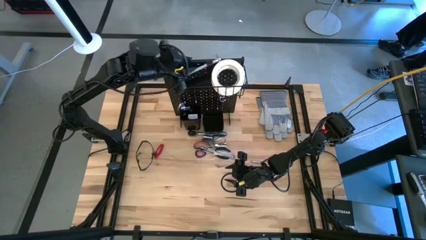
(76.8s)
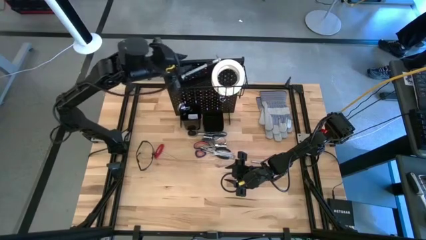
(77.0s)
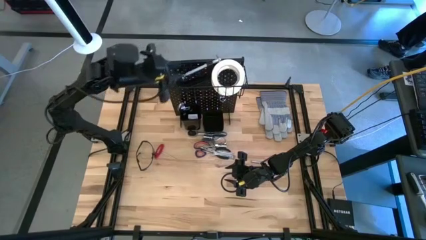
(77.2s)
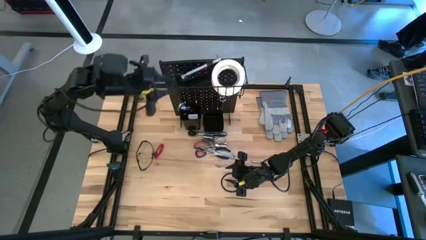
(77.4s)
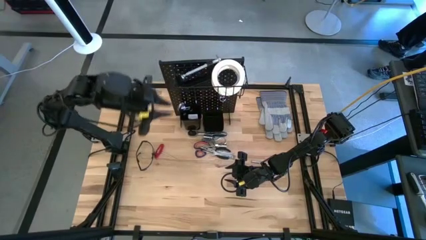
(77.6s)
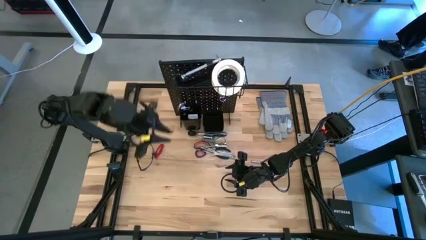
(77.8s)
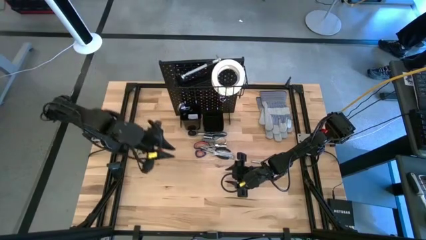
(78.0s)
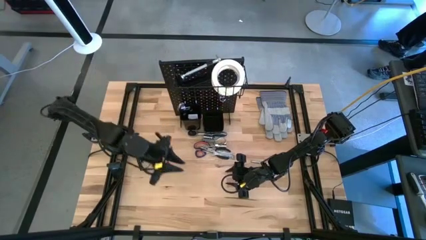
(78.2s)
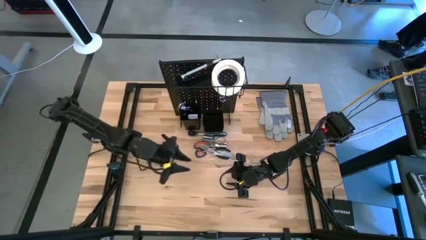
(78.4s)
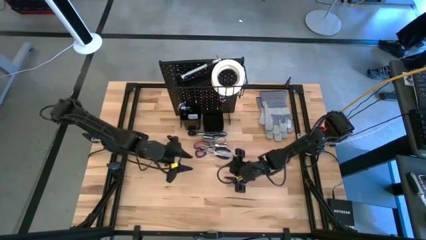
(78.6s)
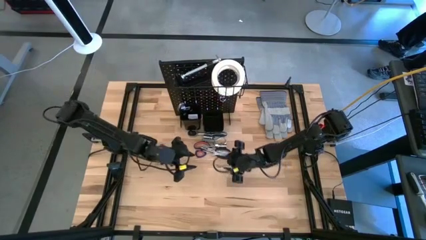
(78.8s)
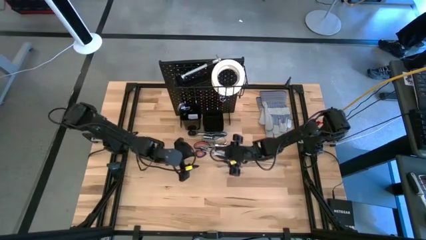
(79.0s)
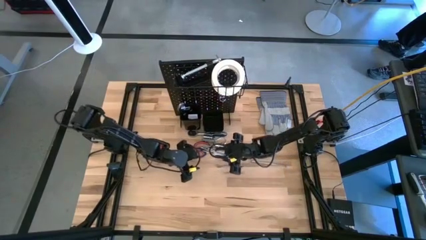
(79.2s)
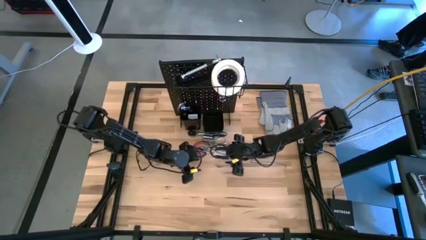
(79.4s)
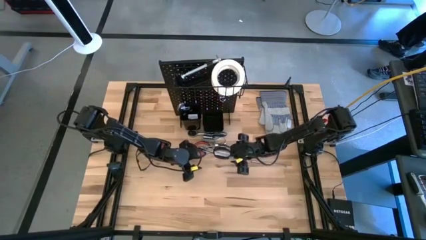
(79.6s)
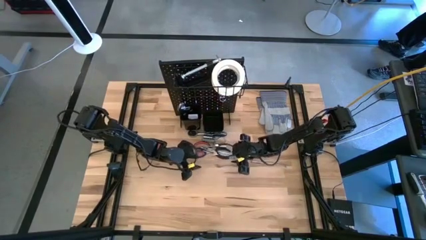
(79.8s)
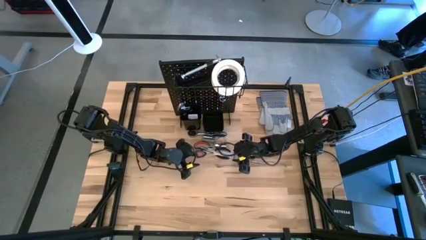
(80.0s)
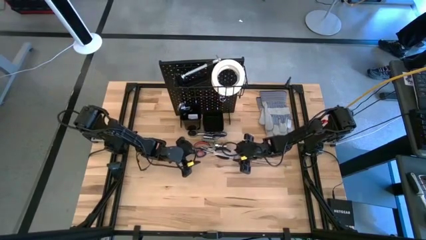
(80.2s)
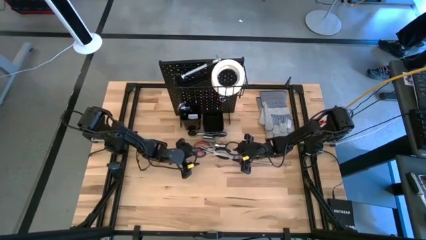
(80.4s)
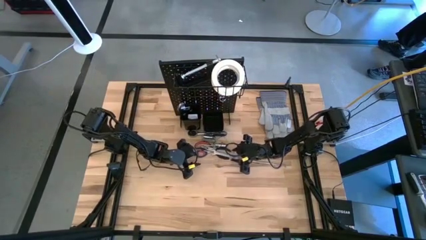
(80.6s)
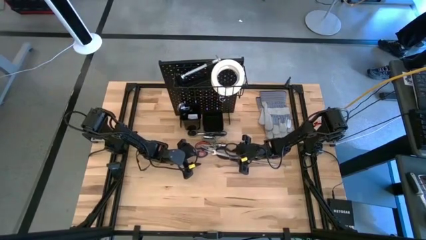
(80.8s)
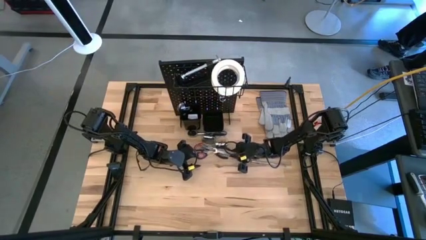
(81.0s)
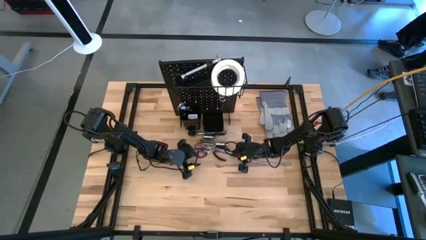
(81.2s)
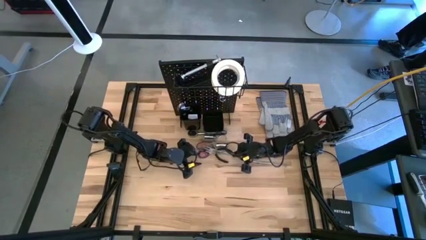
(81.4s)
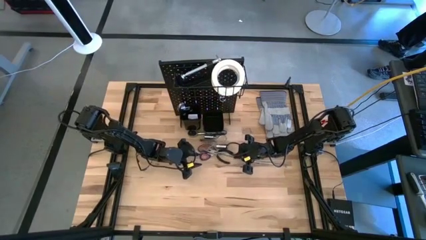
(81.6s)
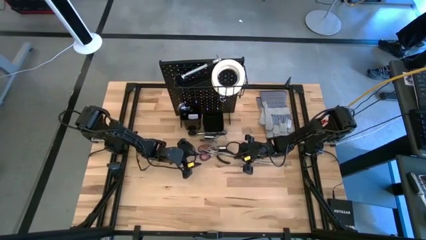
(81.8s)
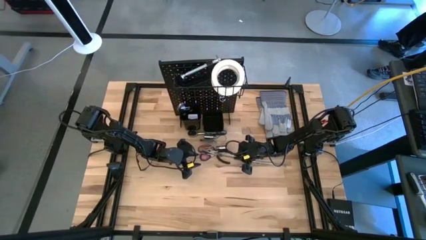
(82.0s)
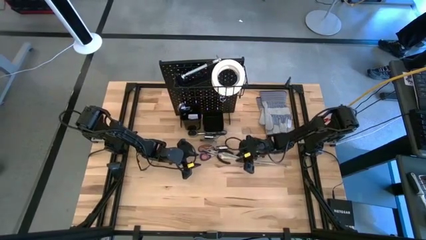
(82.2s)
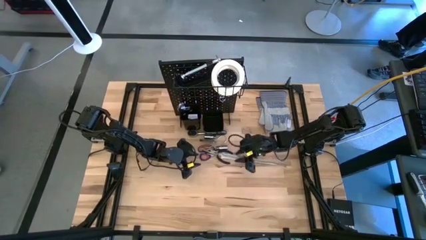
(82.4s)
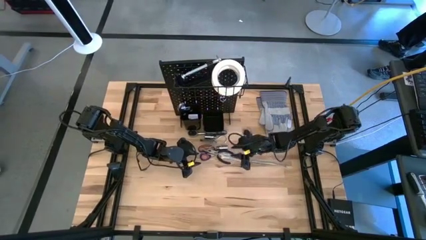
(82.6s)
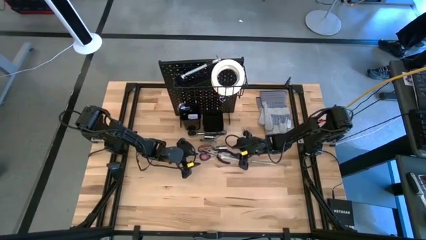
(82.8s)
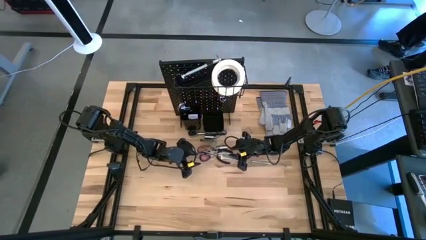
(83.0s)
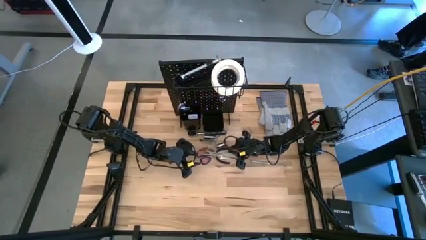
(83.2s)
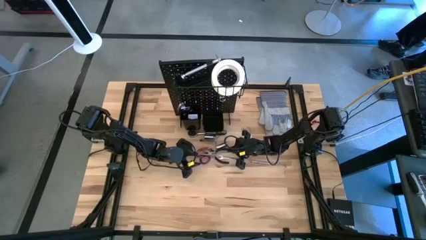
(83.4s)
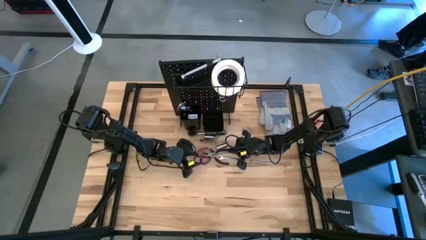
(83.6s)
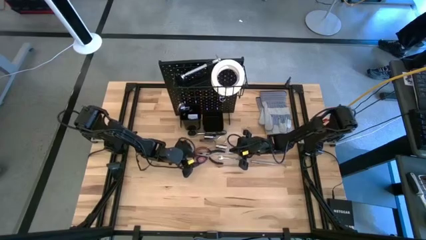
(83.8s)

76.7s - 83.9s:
Task: Hang tools onto peg board
Put the long nose pliers into the left bin on the pegboard

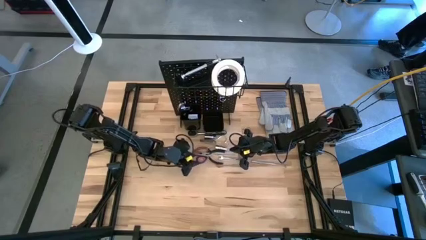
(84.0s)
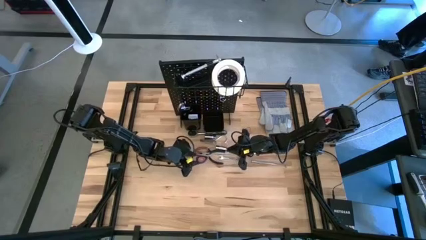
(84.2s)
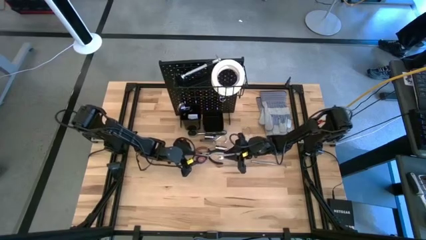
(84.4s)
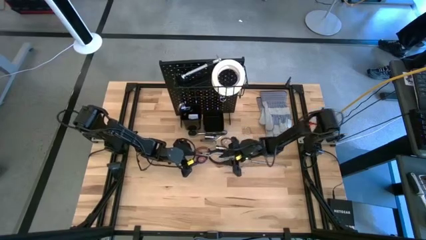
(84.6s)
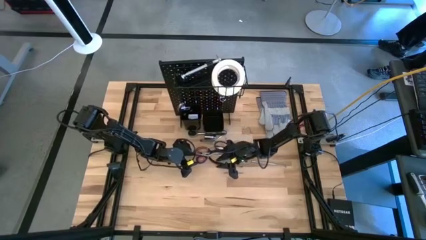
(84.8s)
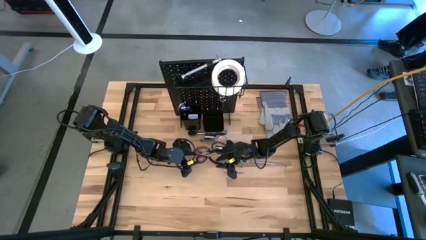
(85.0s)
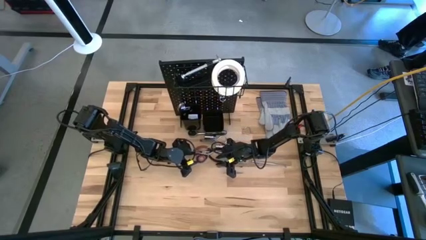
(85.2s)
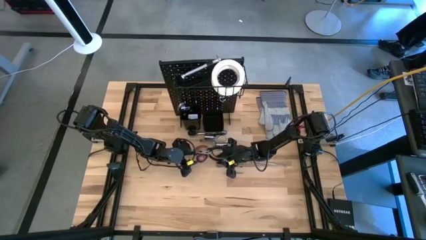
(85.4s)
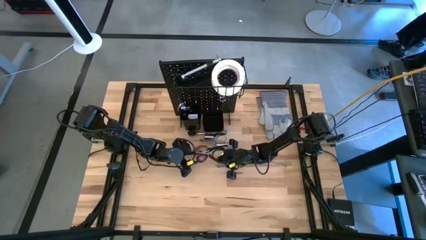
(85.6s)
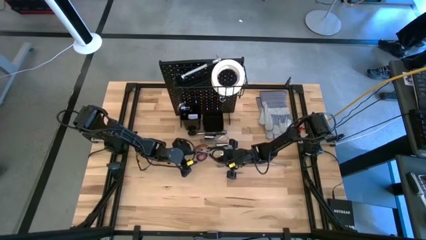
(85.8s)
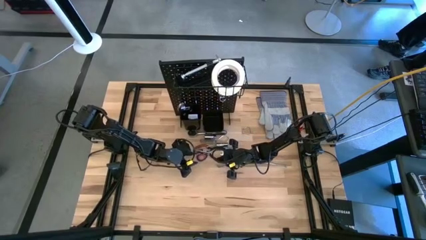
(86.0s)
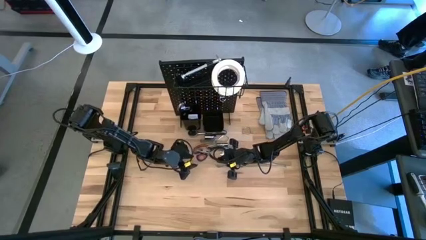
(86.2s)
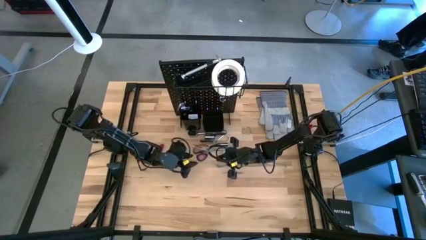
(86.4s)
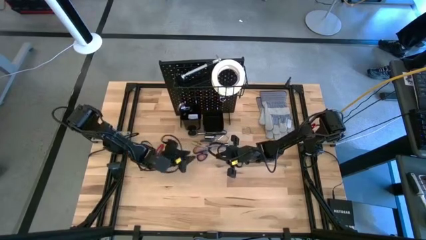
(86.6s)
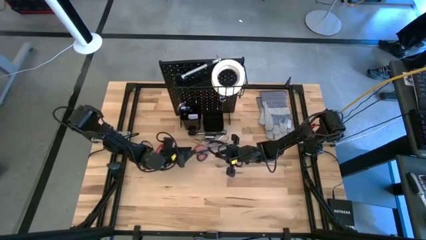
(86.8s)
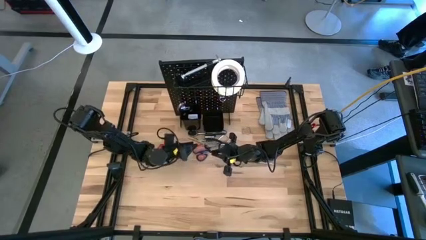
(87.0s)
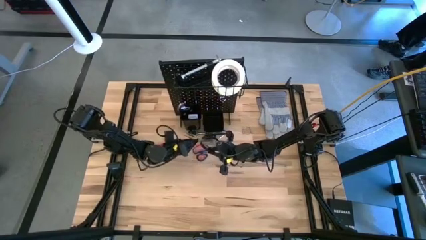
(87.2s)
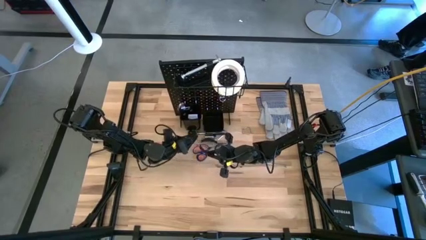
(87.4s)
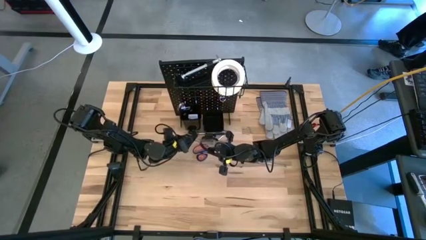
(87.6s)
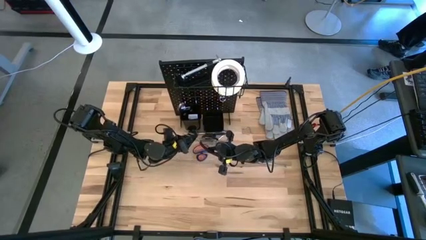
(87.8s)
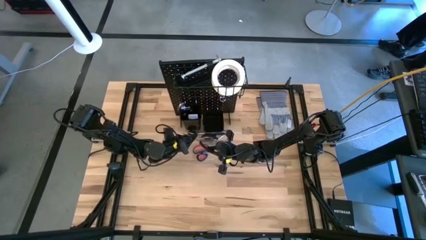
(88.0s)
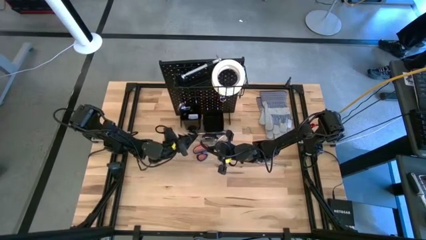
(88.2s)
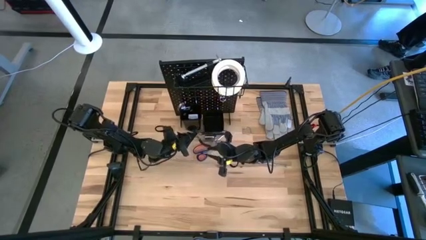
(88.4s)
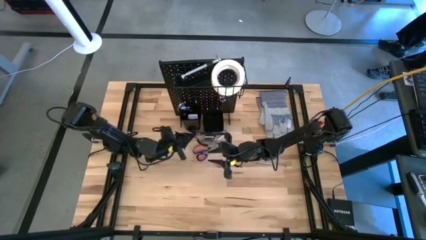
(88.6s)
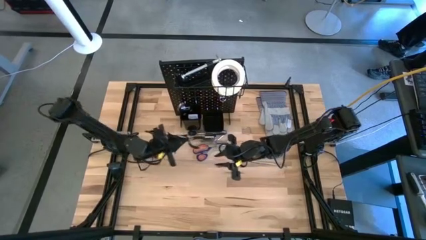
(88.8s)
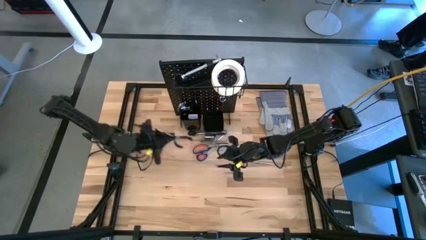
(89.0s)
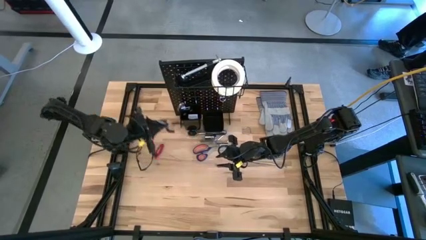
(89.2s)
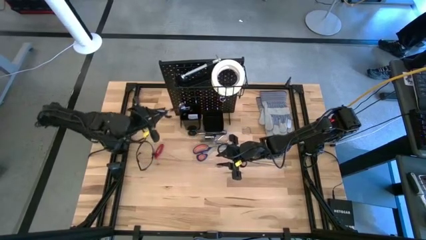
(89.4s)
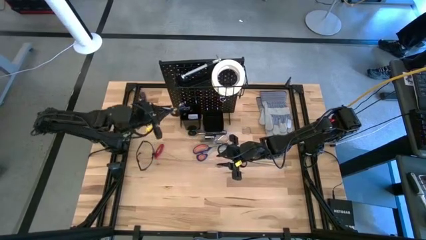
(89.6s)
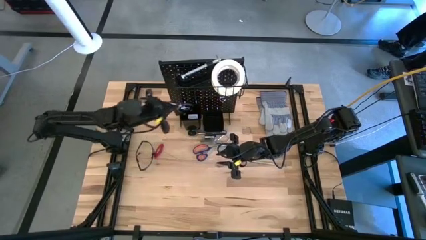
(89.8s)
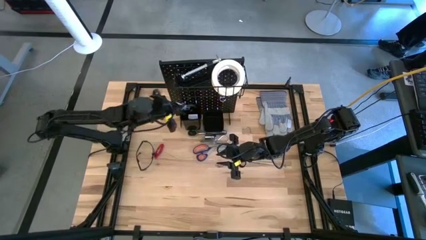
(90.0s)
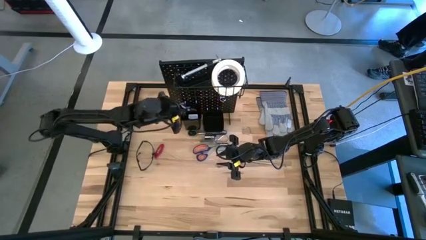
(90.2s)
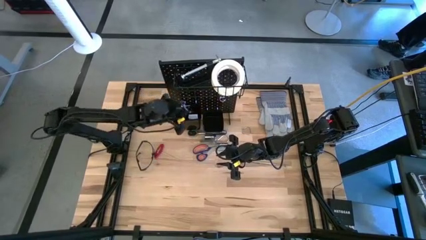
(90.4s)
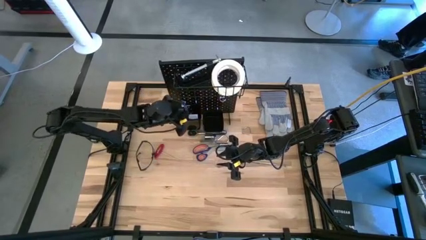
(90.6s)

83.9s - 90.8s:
Put the long nose pliers into the left bin on the pegboard

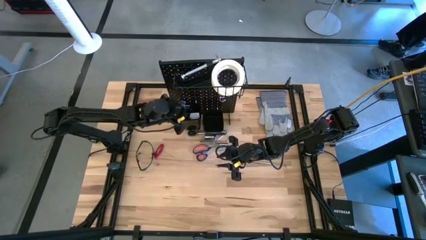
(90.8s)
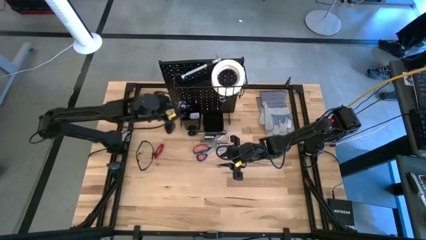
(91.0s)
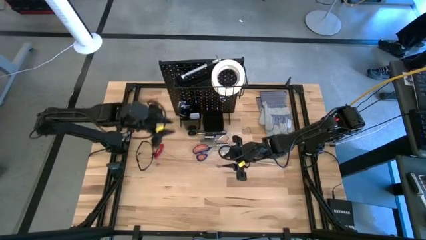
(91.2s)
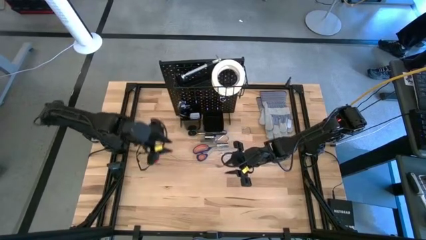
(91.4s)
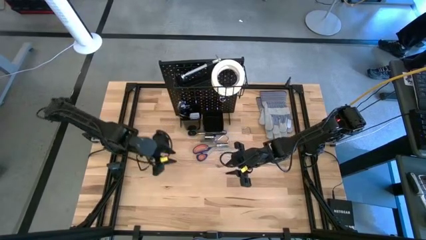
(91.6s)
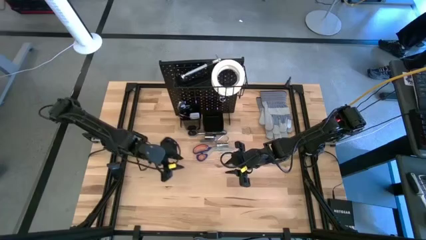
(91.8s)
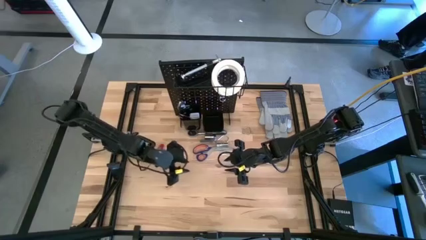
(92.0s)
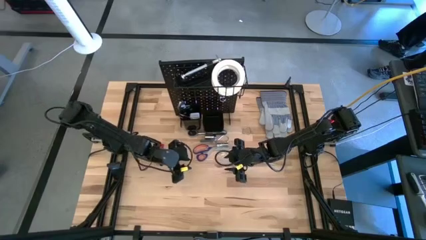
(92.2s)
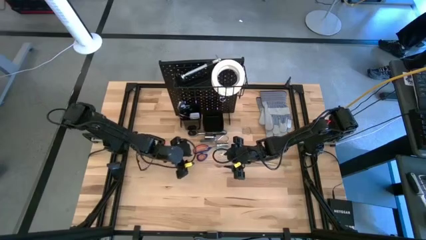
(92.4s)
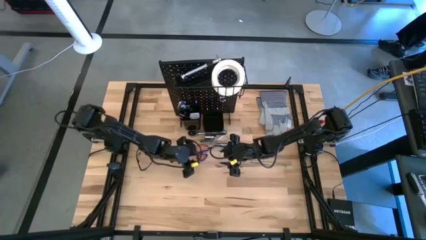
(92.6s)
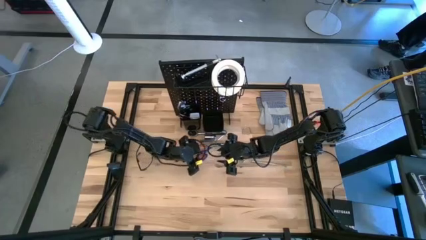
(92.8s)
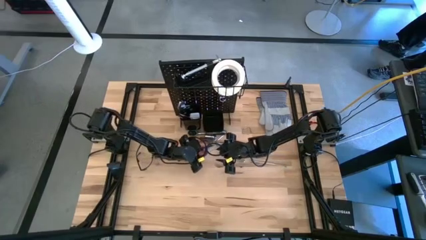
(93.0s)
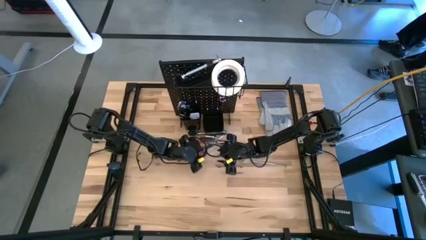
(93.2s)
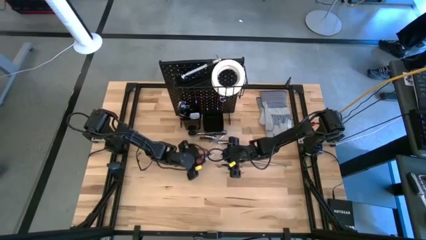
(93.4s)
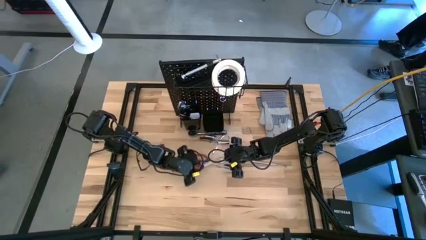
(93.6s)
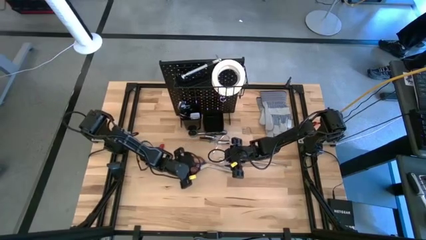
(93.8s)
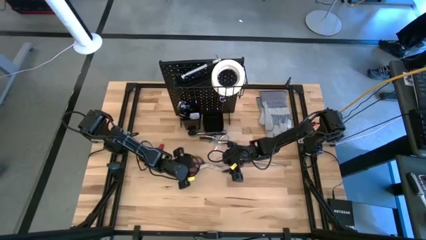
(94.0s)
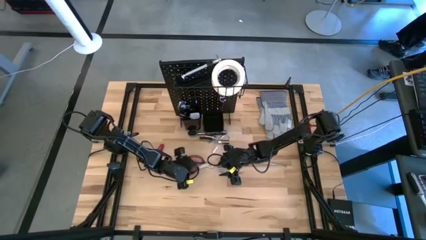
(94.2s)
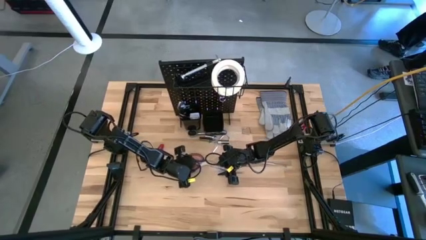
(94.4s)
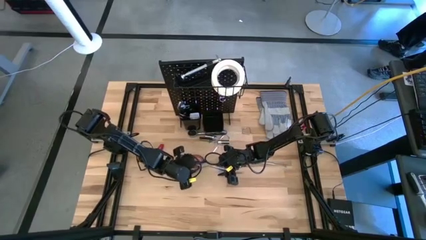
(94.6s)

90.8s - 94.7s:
Put the scissors into the left bin on the pegboard
